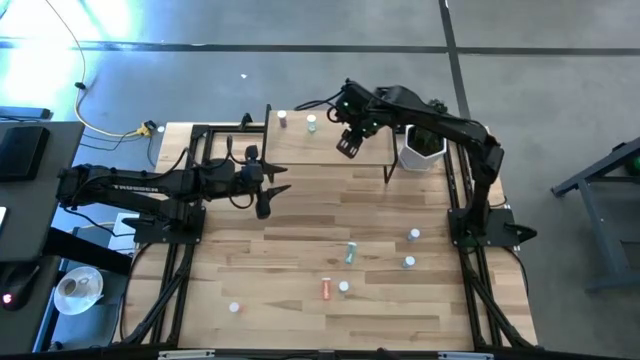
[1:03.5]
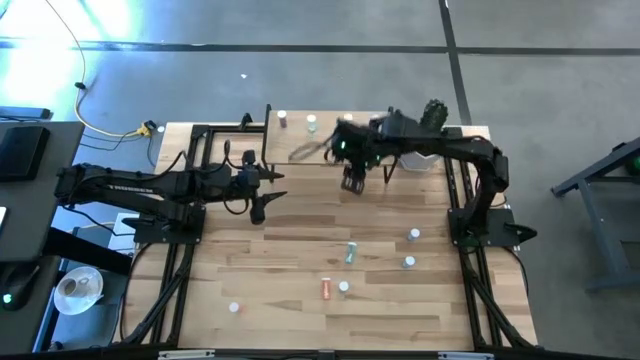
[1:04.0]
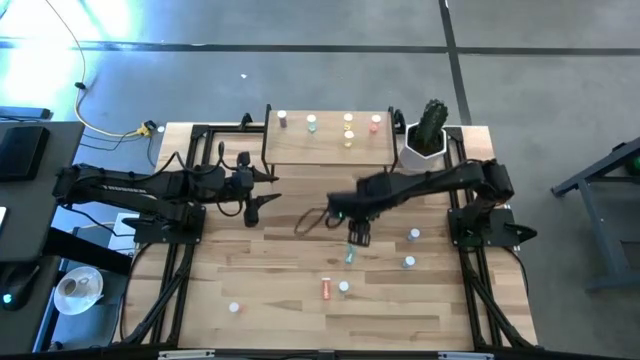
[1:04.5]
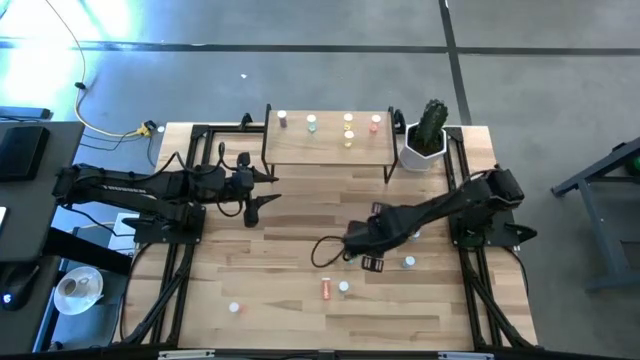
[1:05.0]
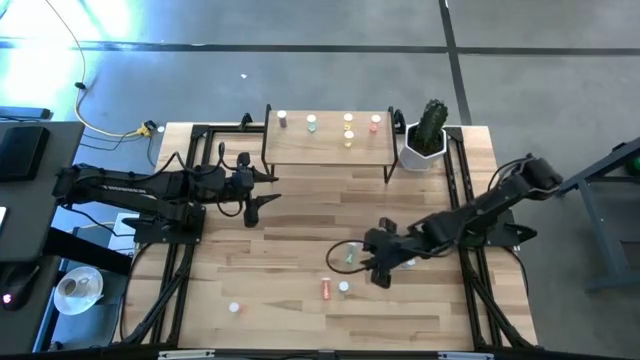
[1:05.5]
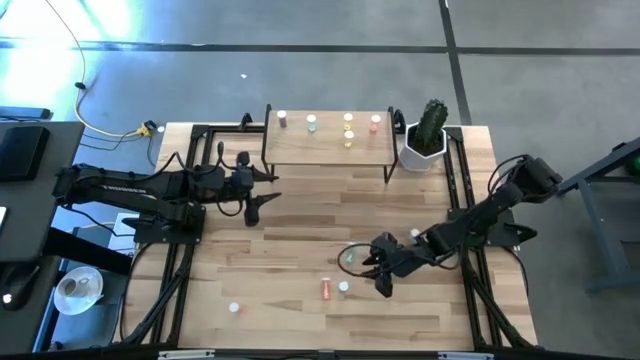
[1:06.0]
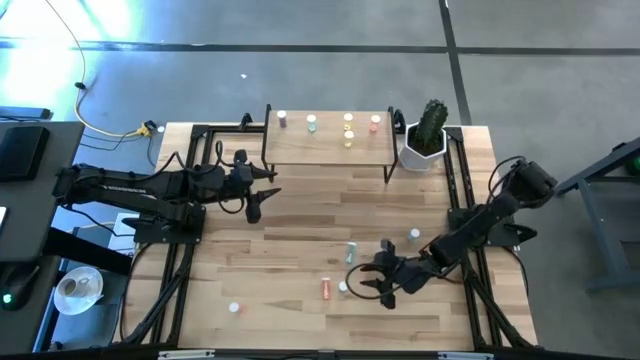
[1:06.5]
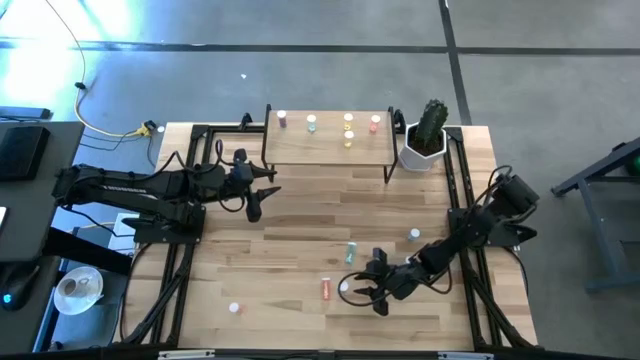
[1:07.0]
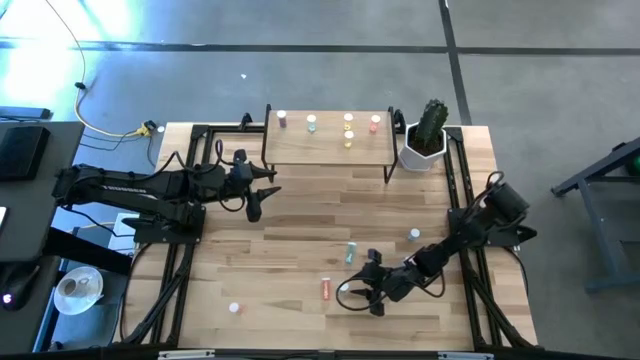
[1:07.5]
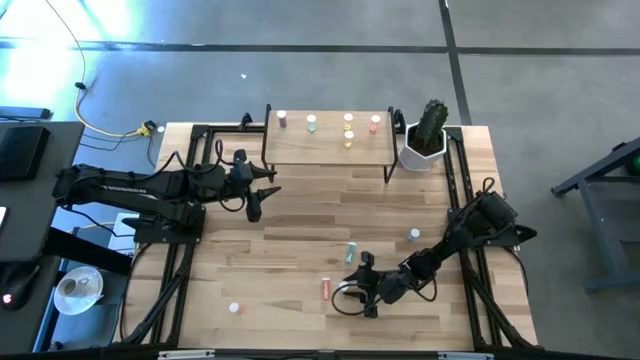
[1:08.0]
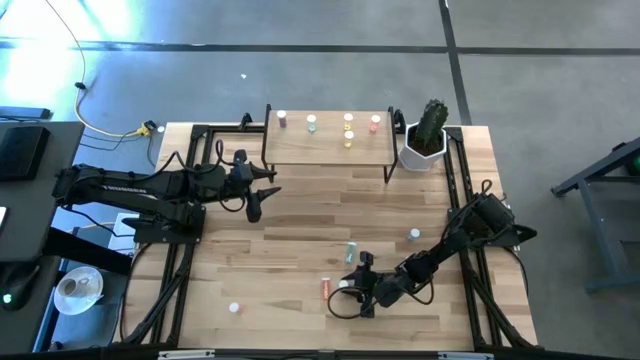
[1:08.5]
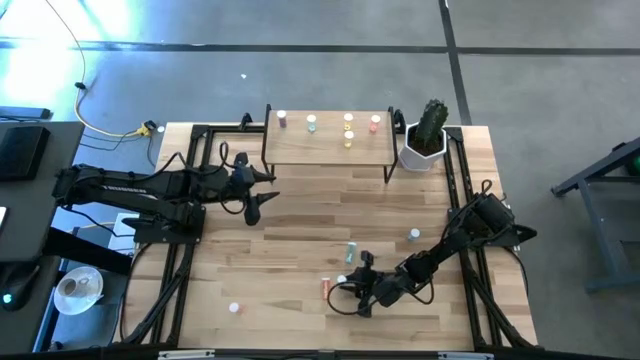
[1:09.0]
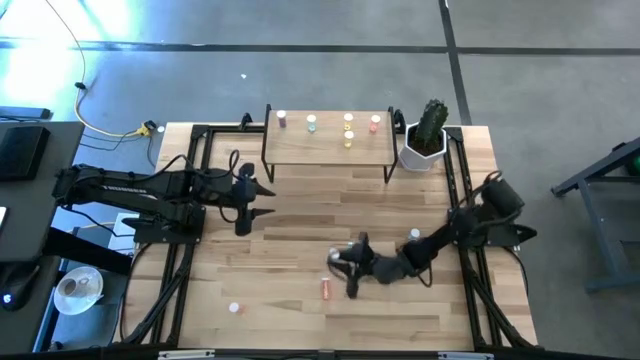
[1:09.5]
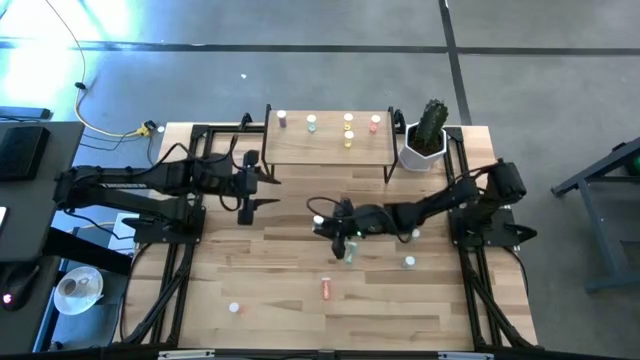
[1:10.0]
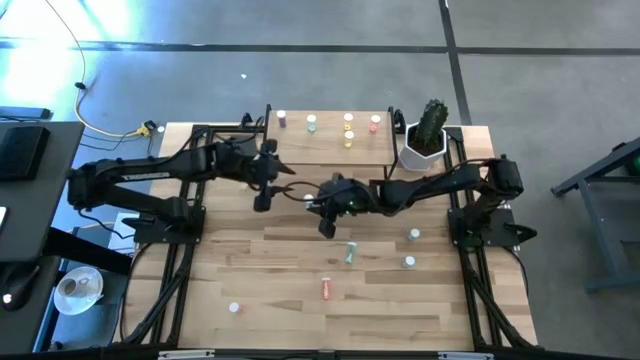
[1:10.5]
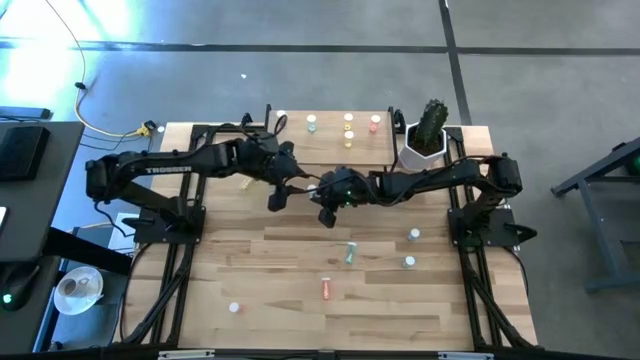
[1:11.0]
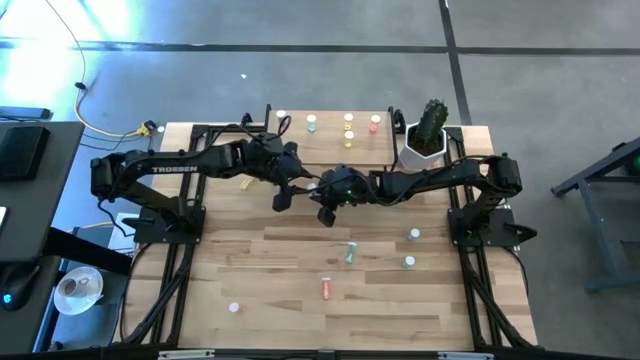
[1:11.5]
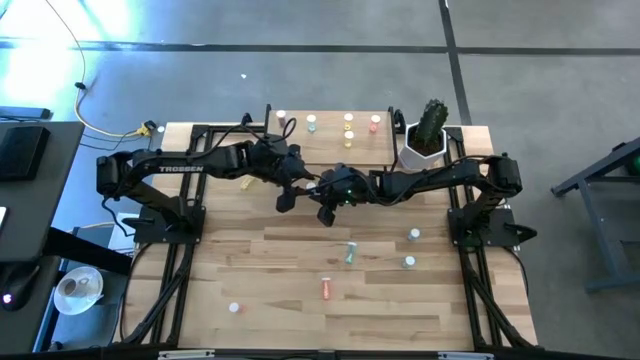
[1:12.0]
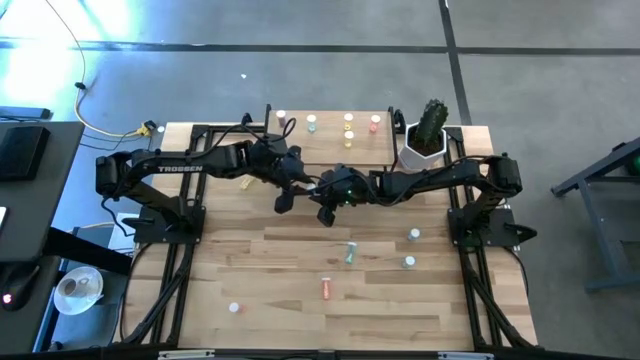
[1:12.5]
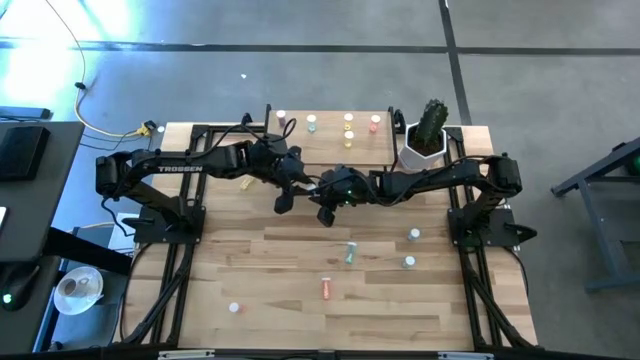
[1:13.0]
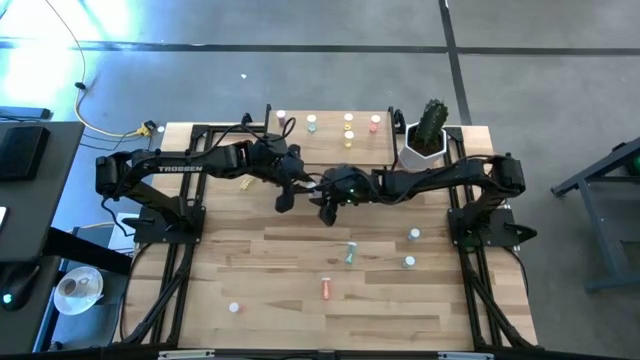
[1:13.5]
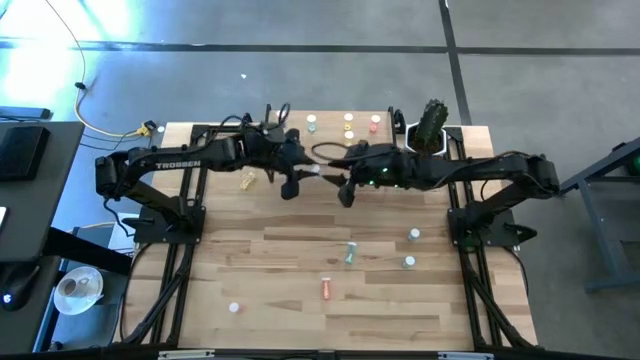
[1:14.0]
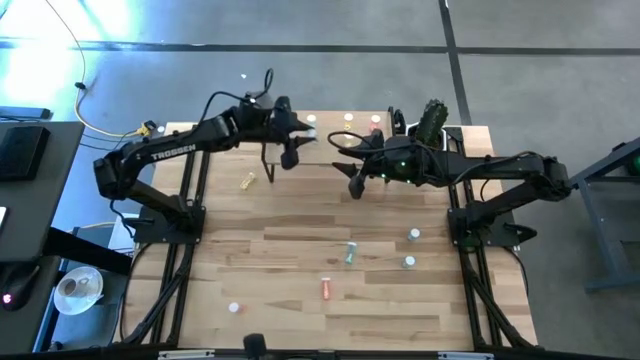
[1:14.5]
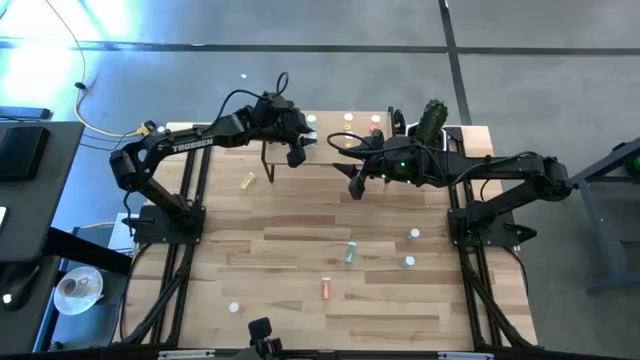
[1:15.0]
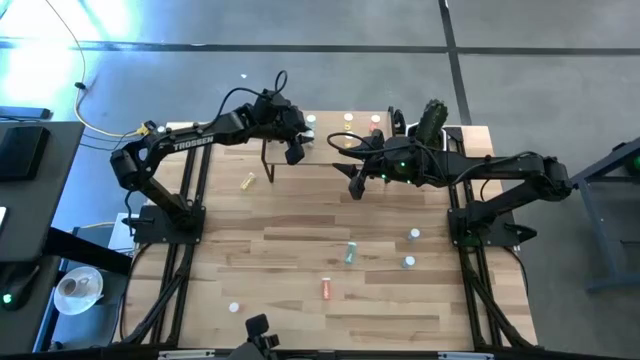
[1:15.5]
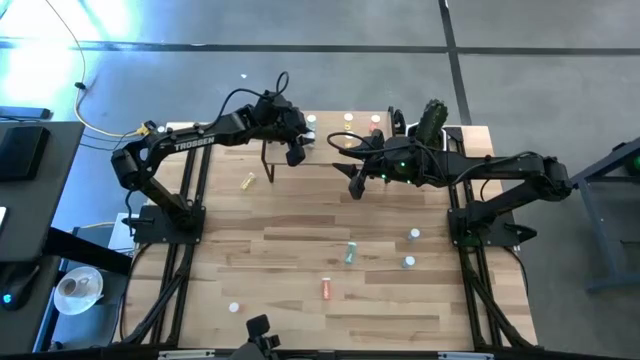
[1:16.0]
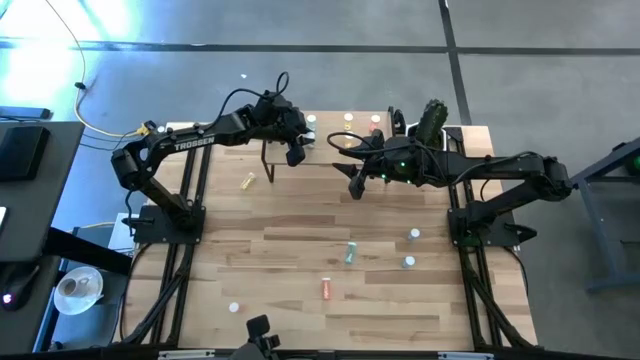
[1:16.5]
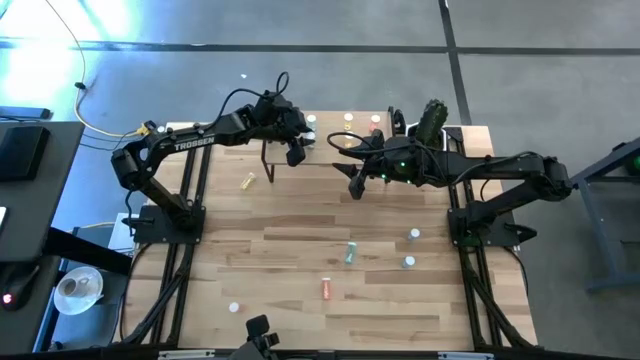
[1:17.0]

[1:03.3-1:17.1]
Task: Pick and place medicine bottles onto shelf by color
Put the bottom left blue pill bottle on the shelf aligned with the other blue pill bottle

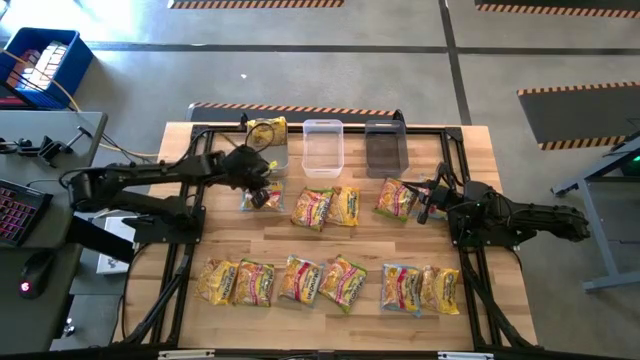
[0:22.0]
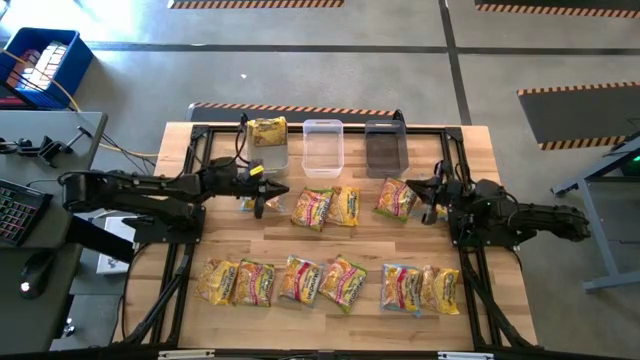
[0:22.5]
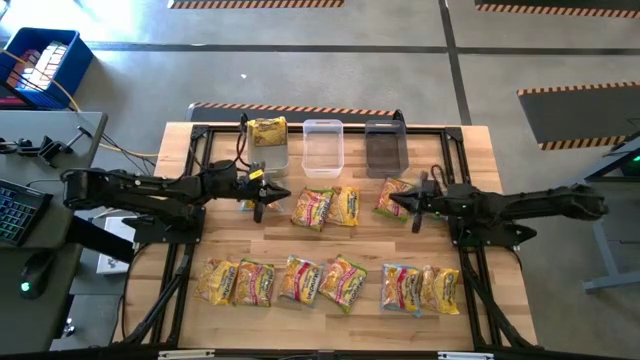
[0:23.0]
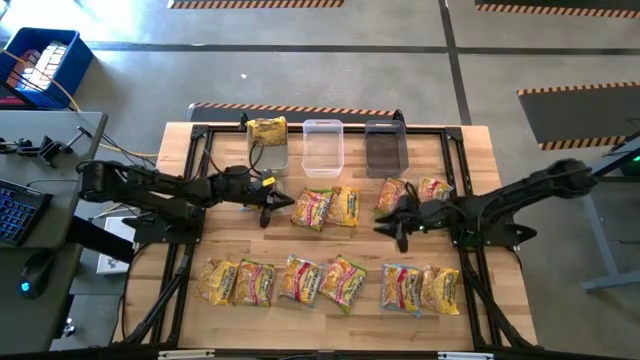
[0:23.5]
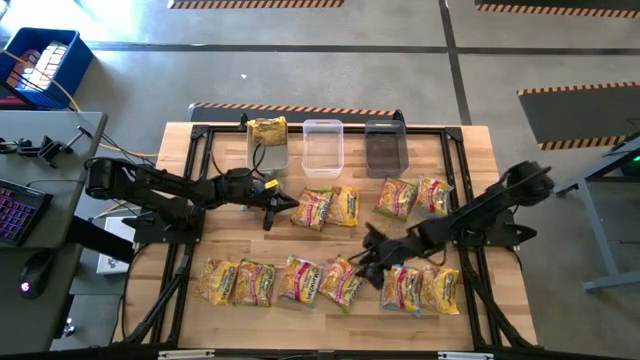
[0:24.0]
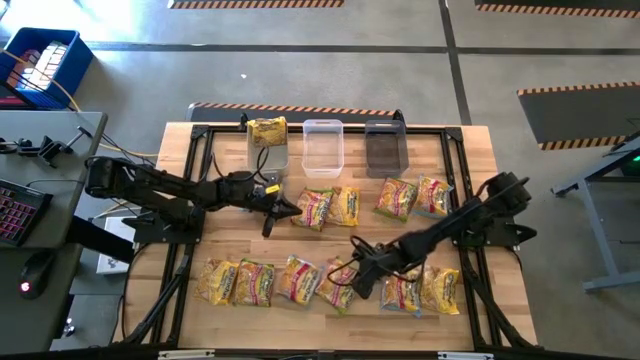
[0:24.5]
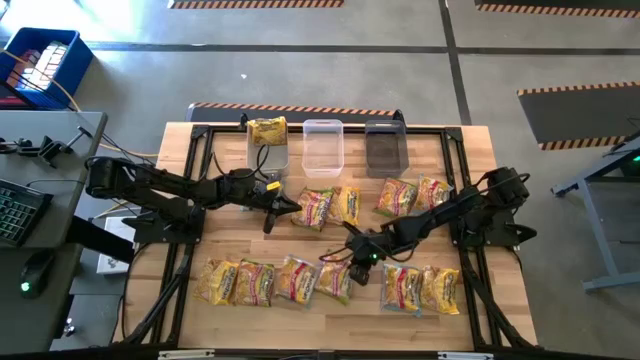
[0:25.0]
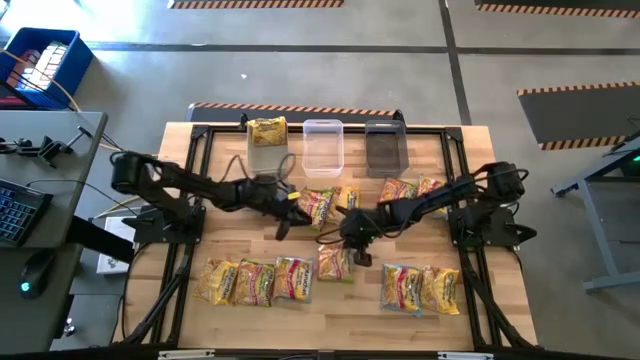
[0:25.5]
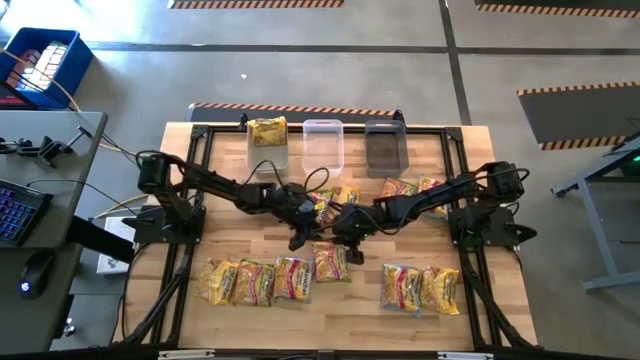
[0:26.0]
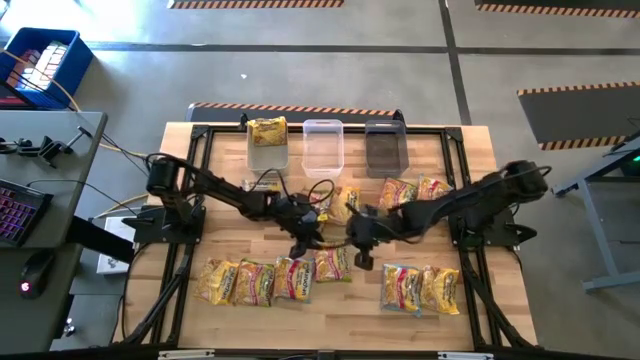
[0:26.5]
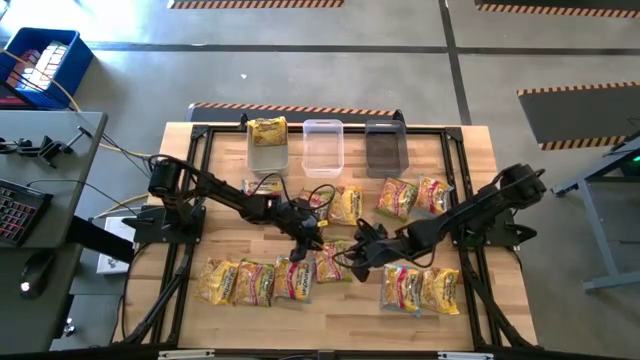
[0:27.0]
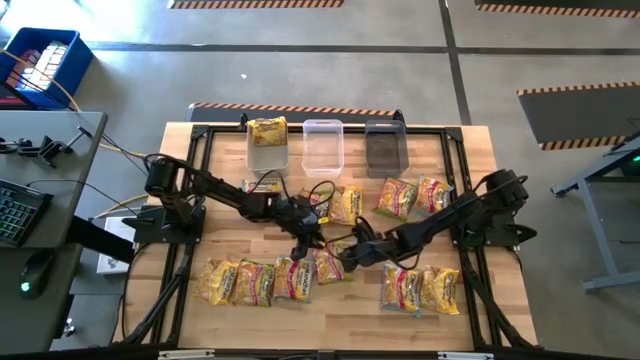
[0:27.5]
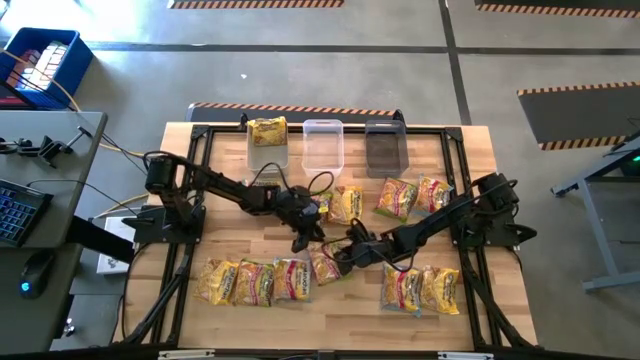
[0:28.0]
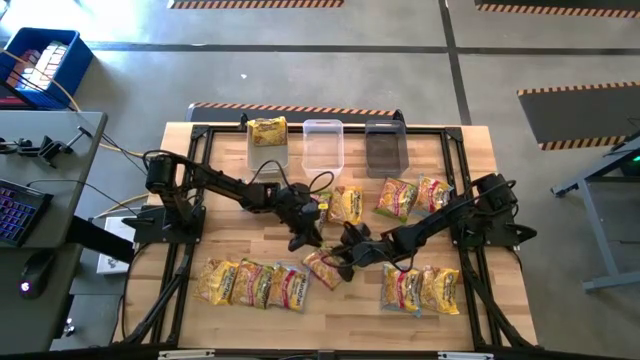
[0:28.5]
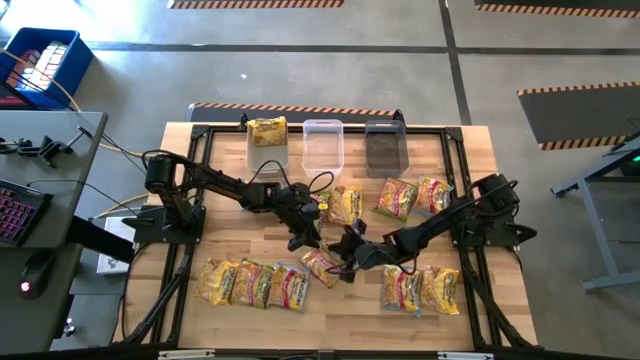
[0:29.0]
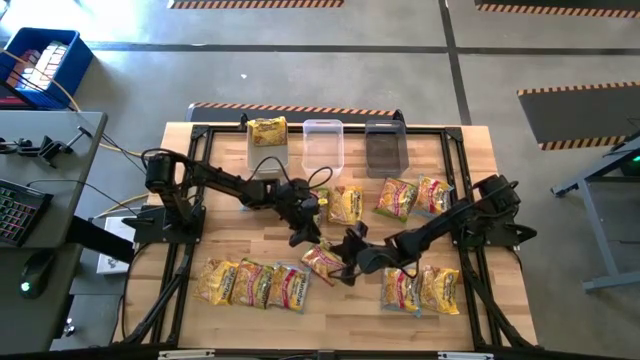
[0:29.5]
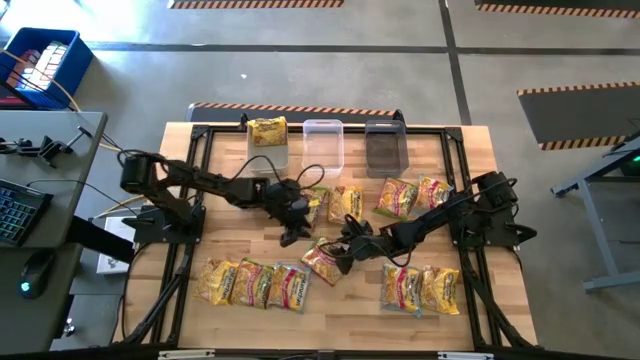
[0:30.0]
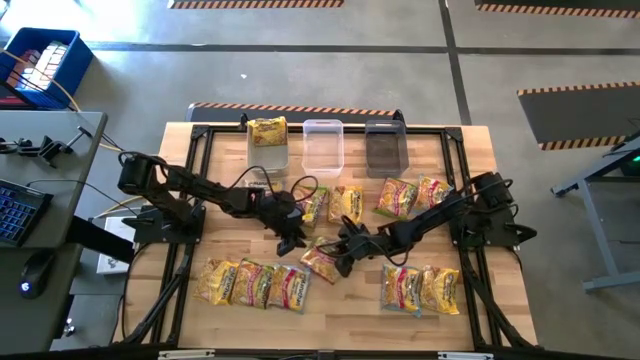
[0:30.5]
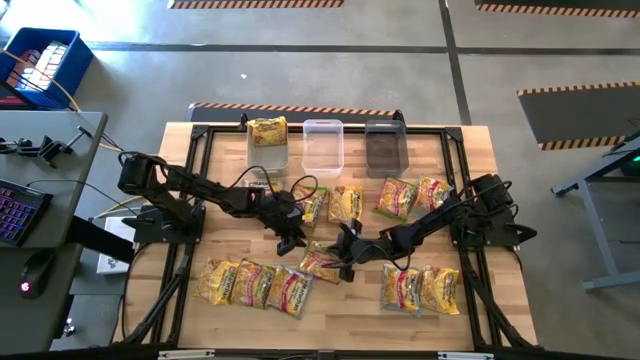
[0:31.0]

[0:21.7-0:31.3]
Task: Sort Maruchan noodles
Put the bottom middle green noodle pack closer to the gripper
